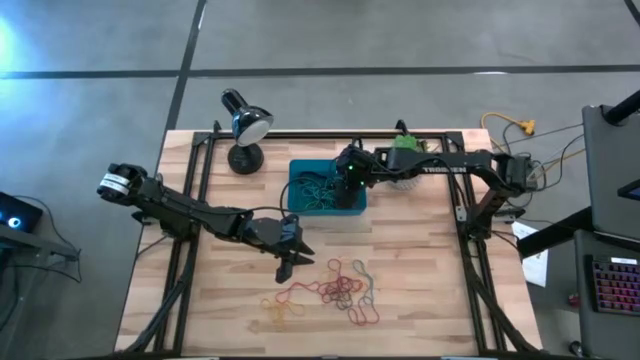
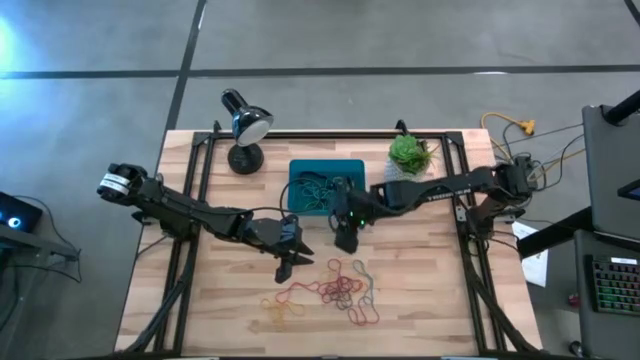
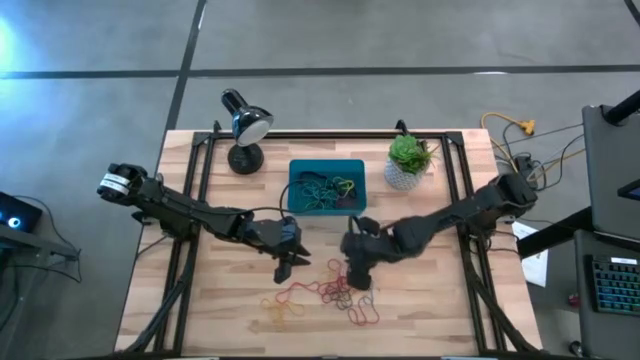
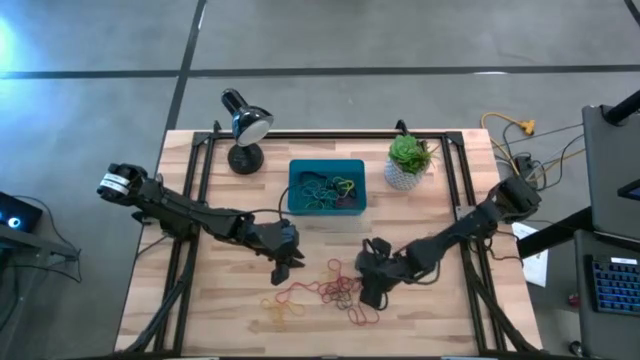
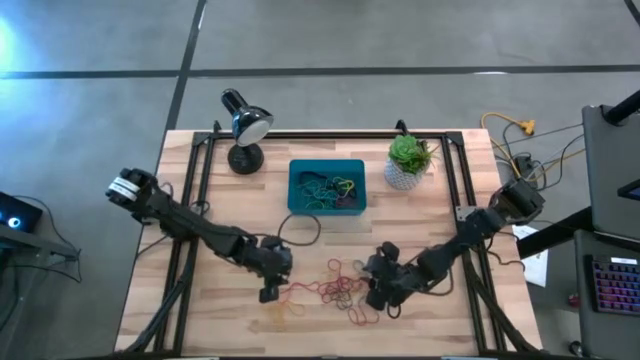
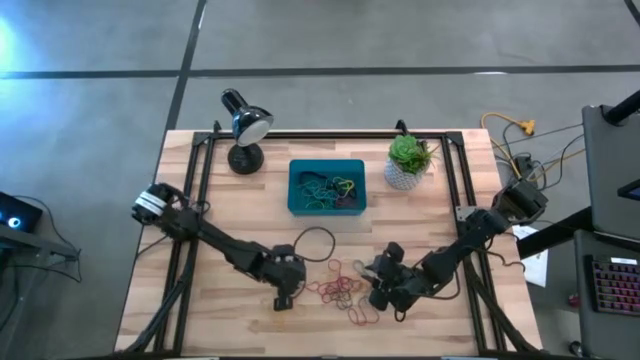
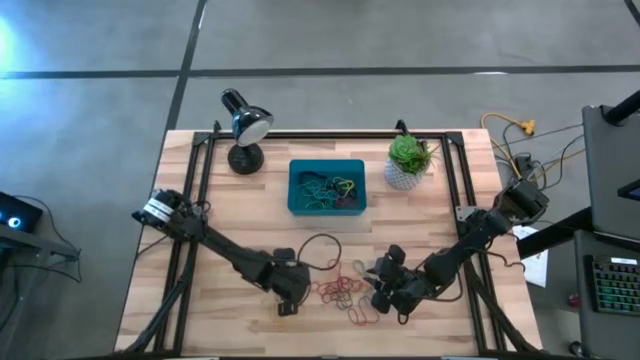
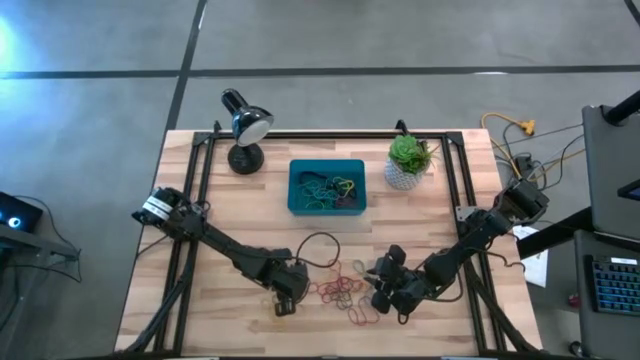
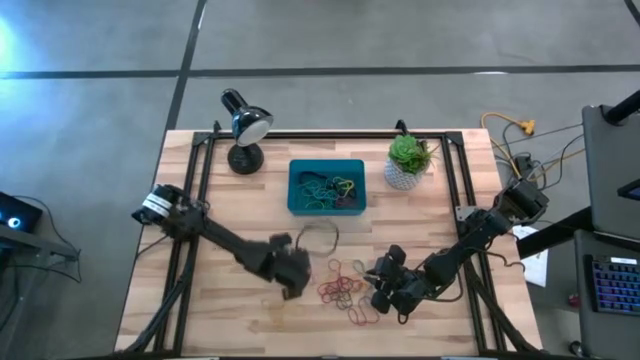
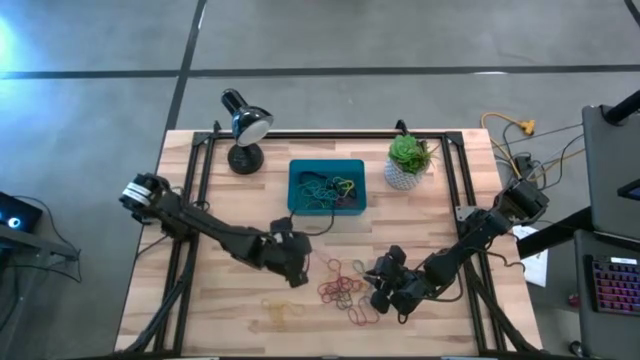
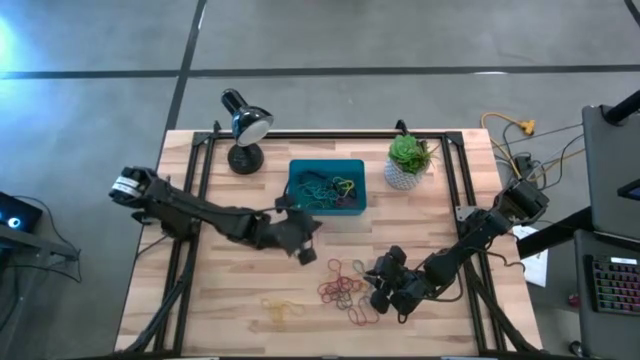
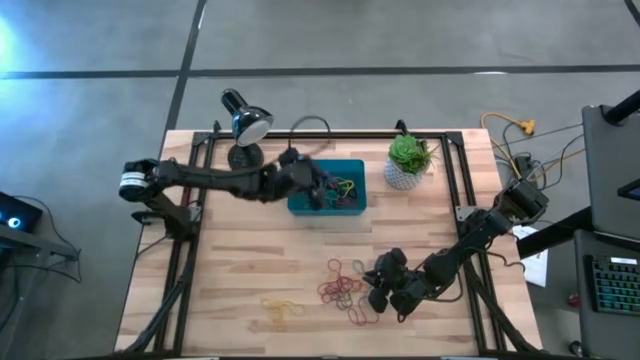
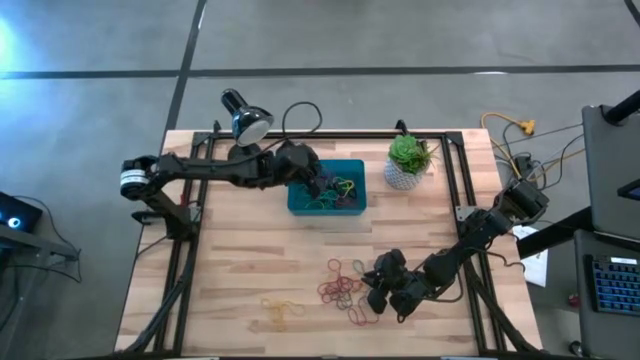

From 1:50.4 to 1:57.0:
Task: Pick and place rubber bands into bin
Put the red rubber band into the dark blue bin

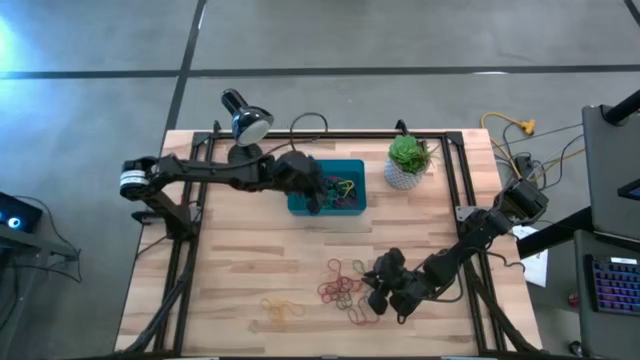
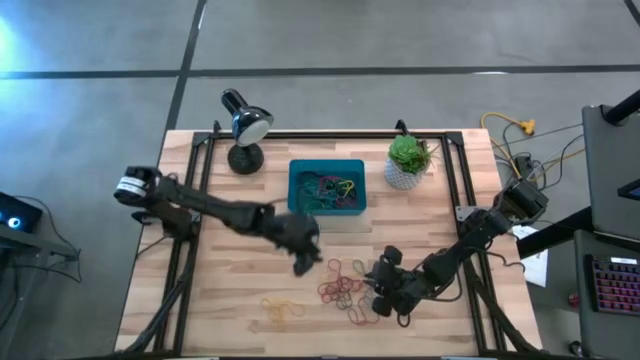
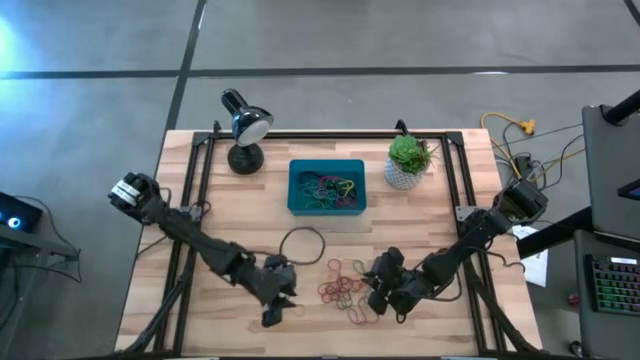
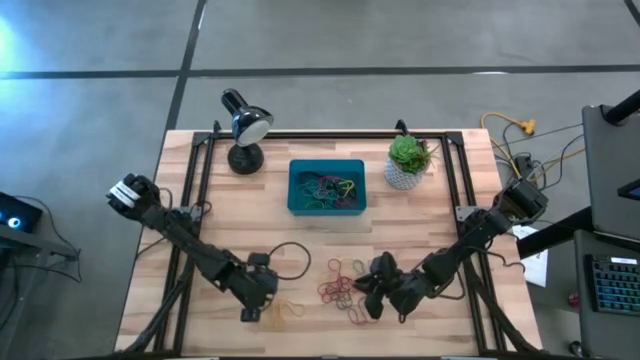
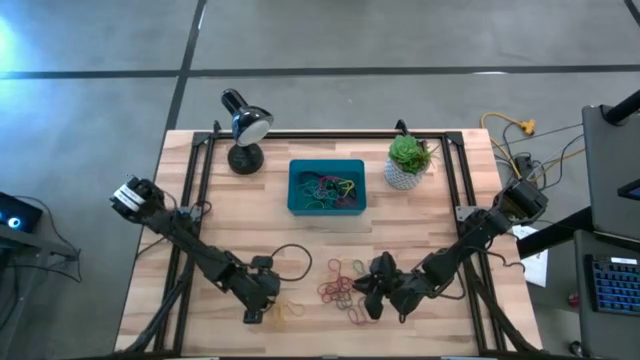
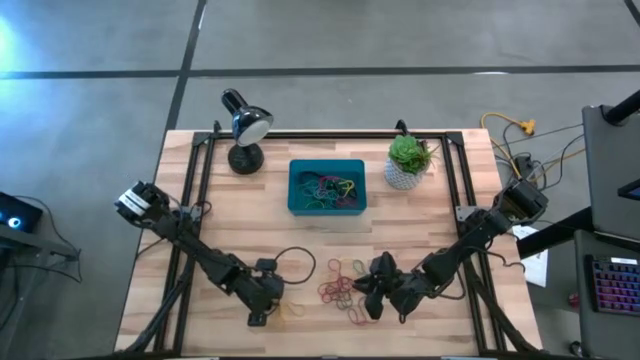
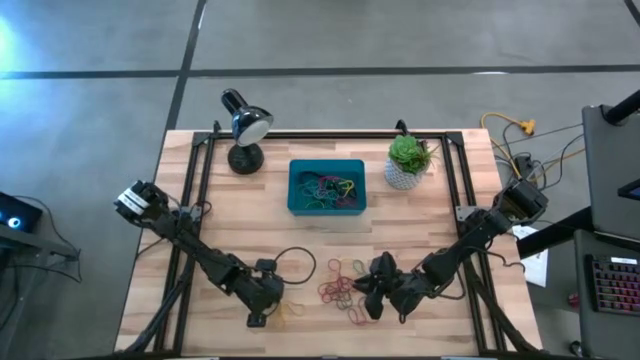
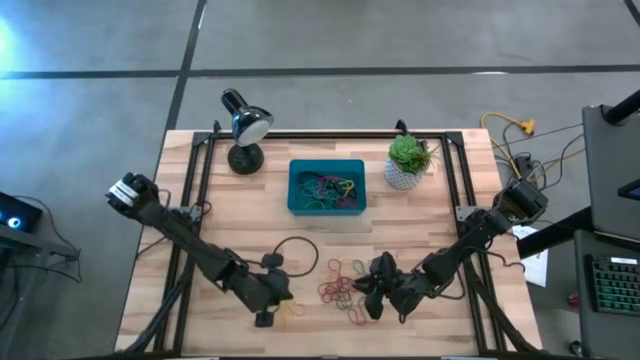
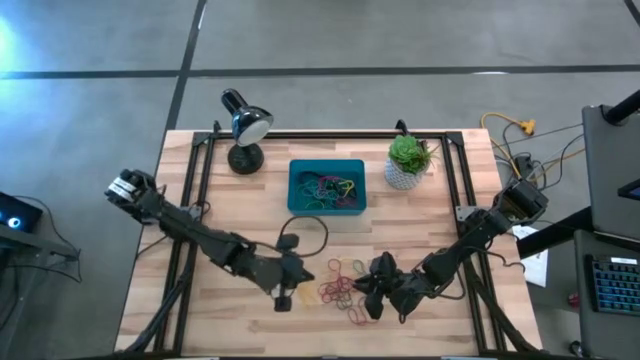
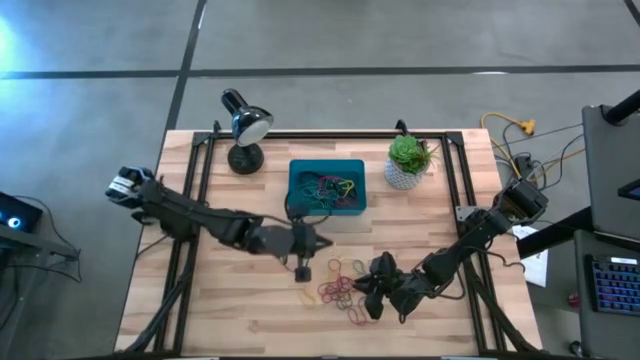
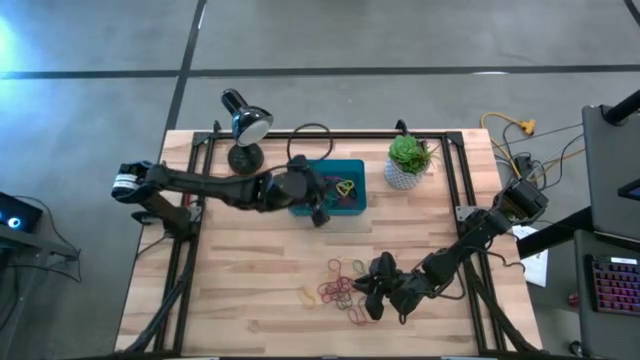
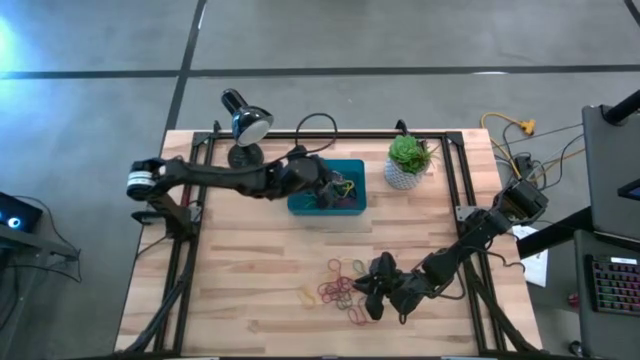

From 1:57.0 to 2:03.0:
Put the yellow rubber band into the dark blue bin

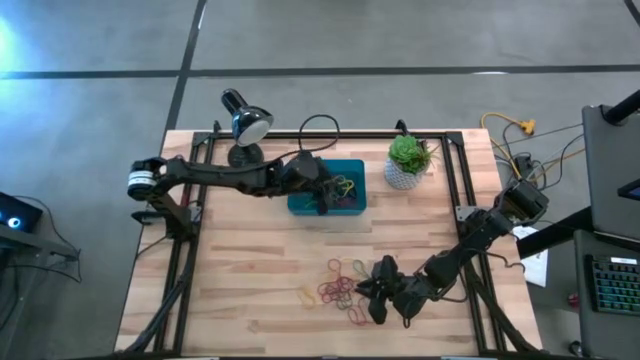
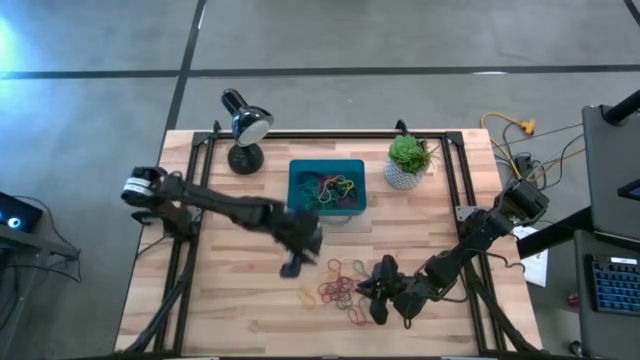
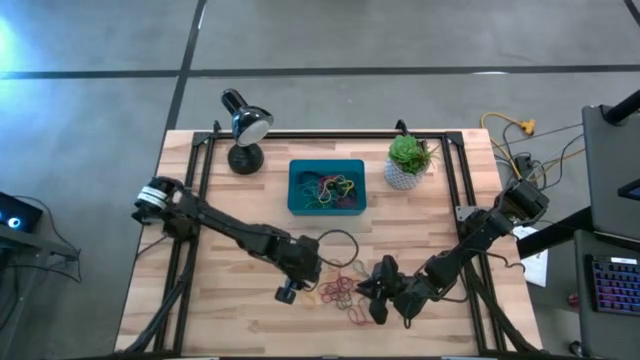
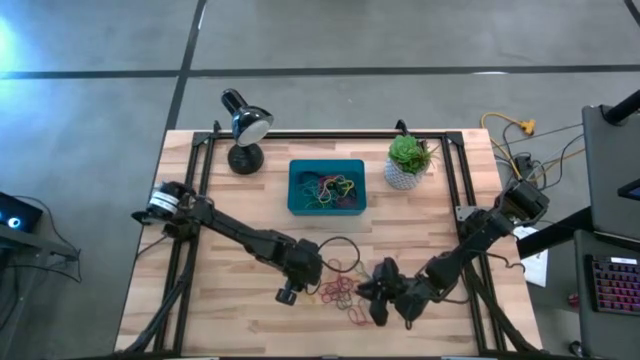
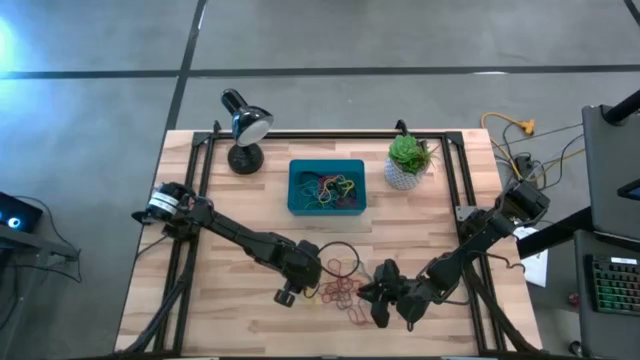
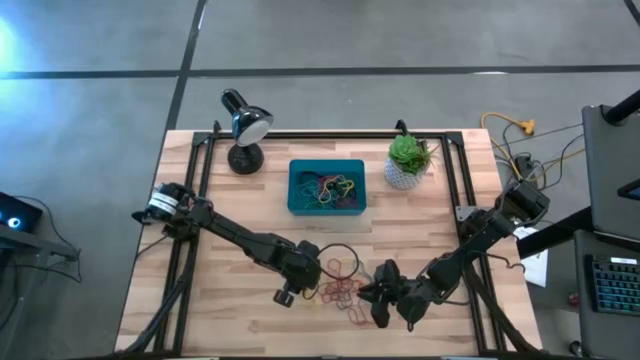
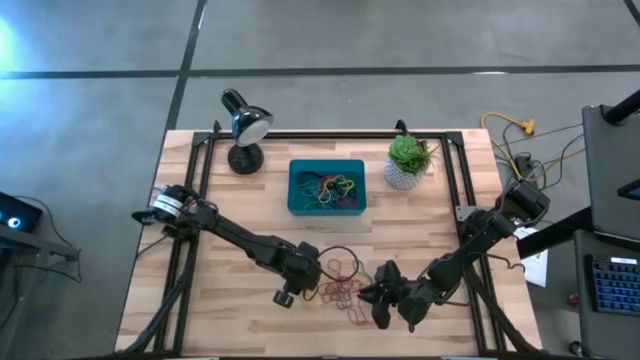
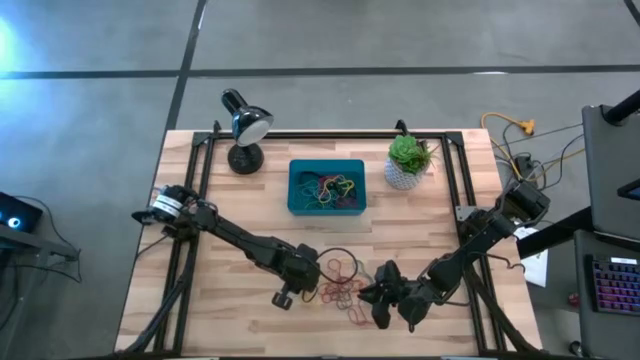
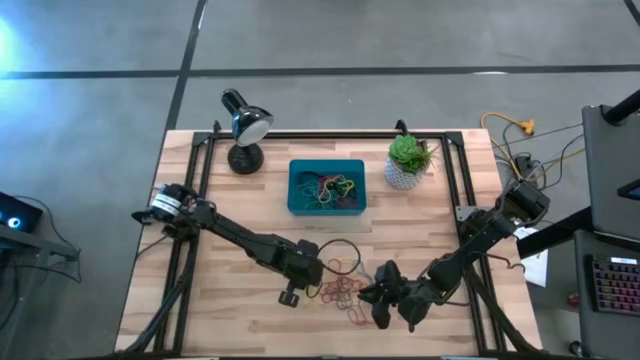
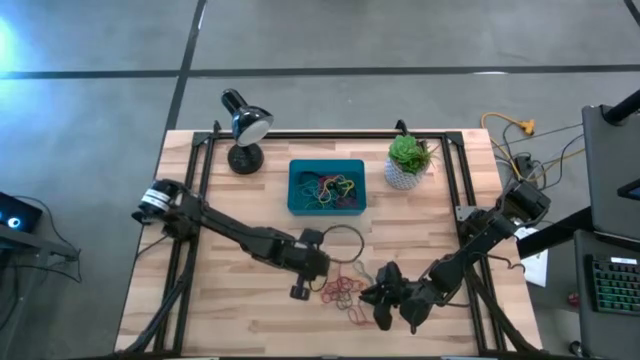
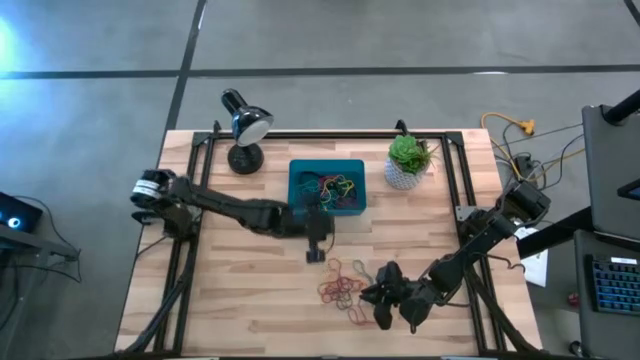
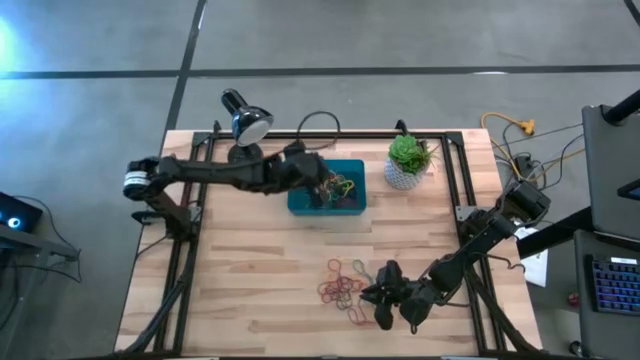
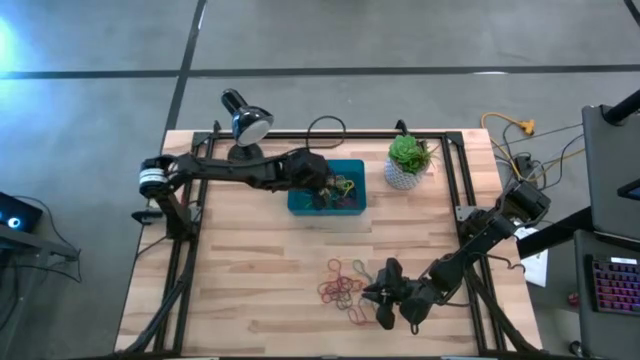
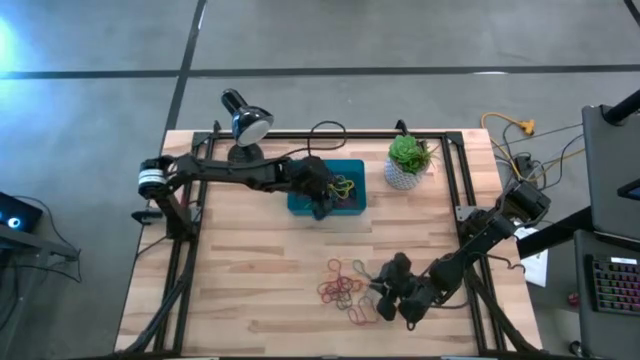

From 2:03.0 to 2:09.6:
Put the yellow rubber band into the dark blue bin

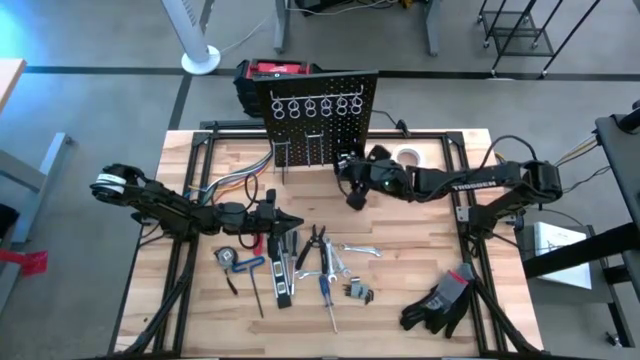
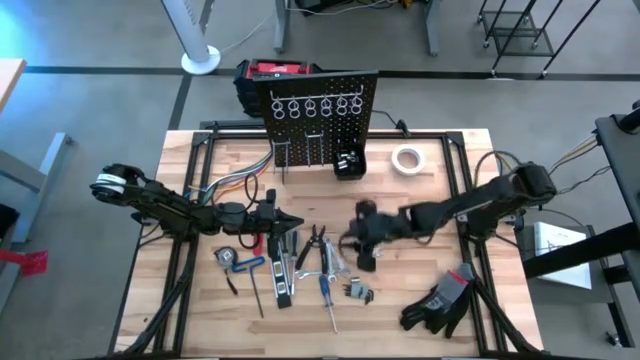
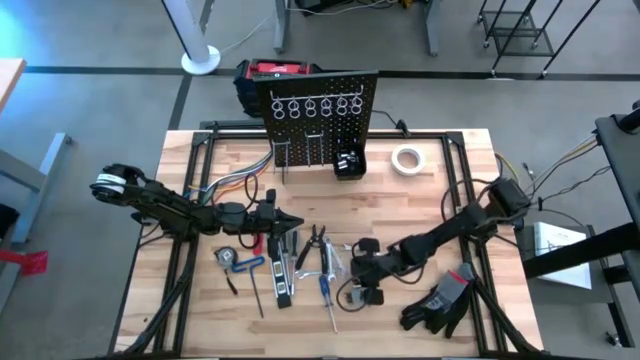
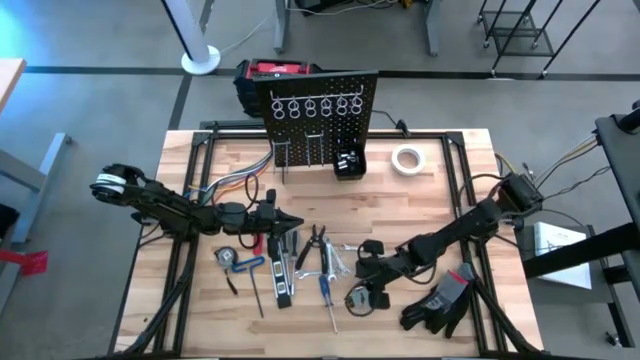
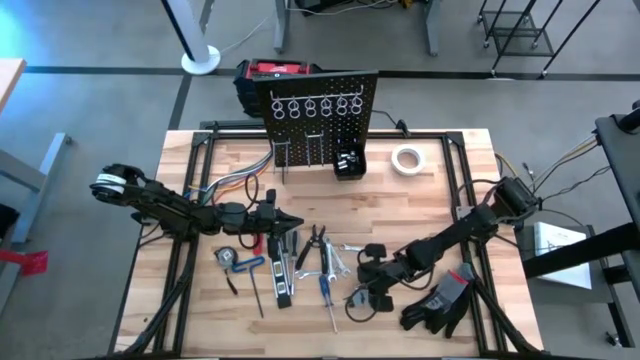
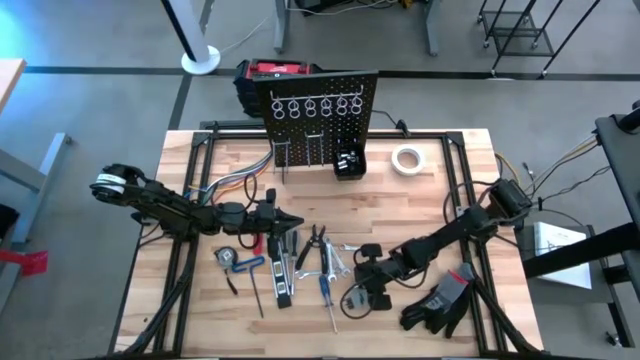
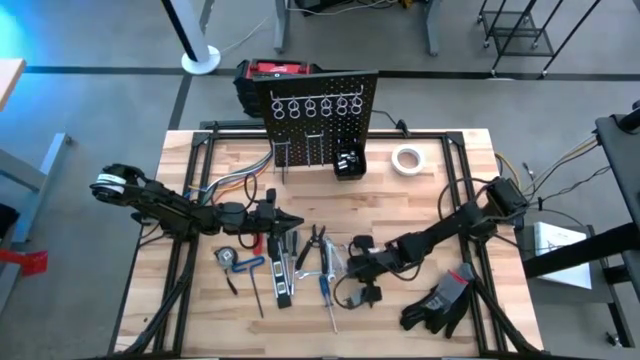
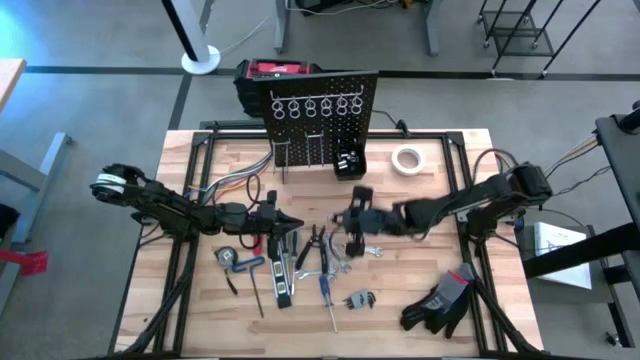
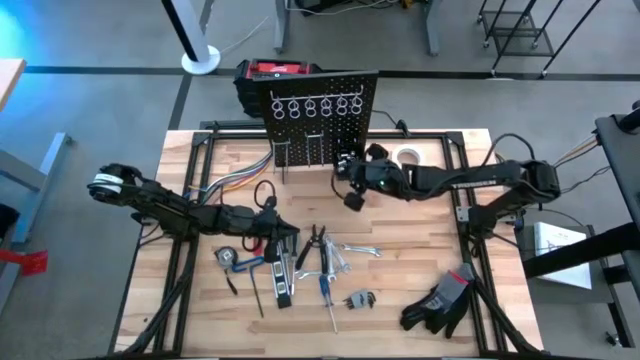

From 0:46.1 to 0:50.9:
Task: Hang tools onto peg board
Put the socket into the black tool bin on the peg board
